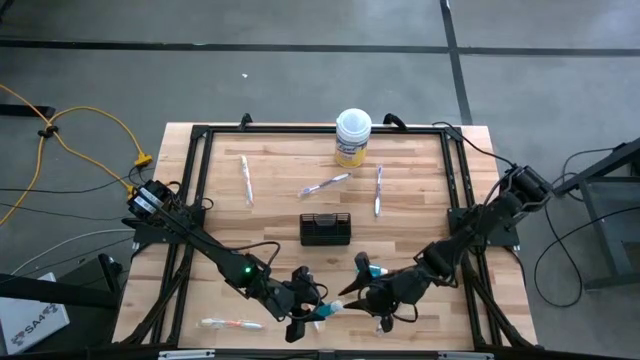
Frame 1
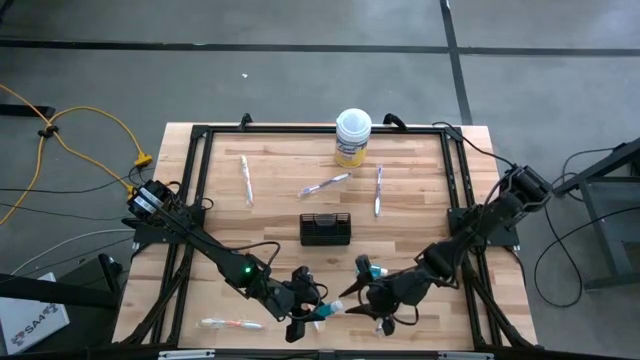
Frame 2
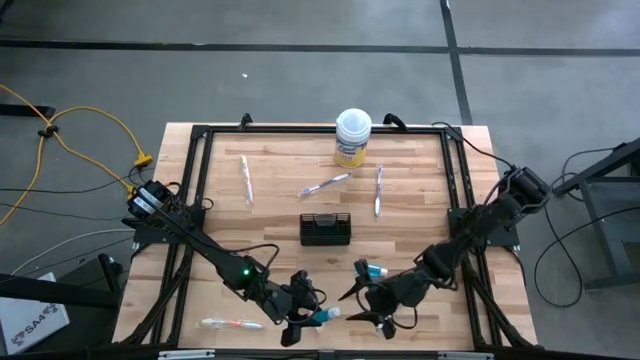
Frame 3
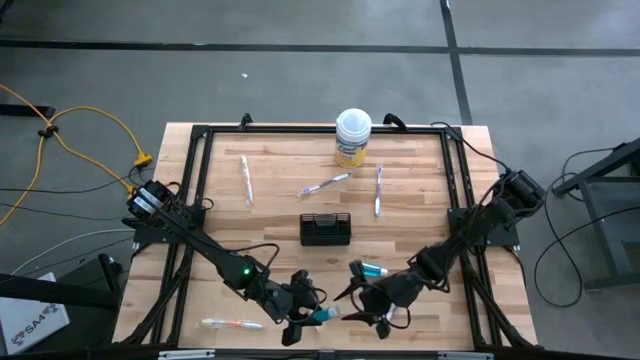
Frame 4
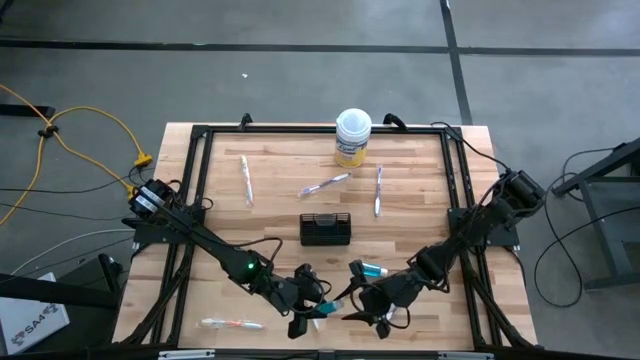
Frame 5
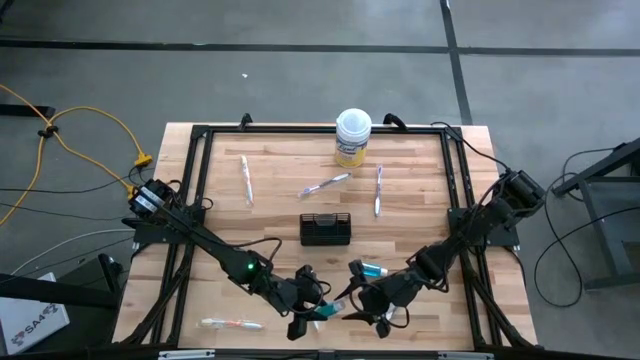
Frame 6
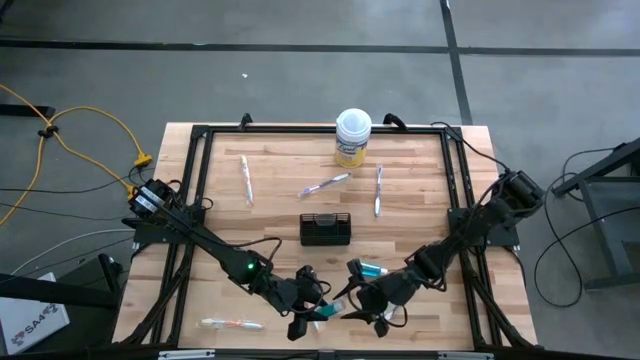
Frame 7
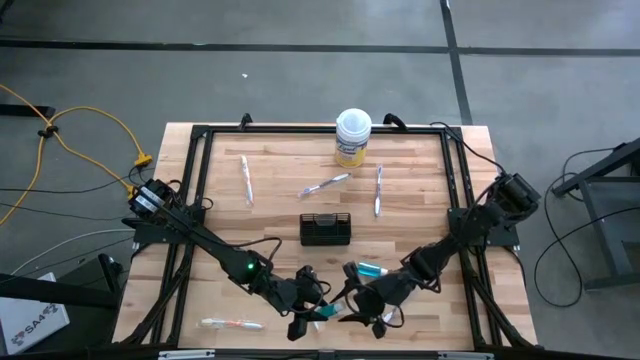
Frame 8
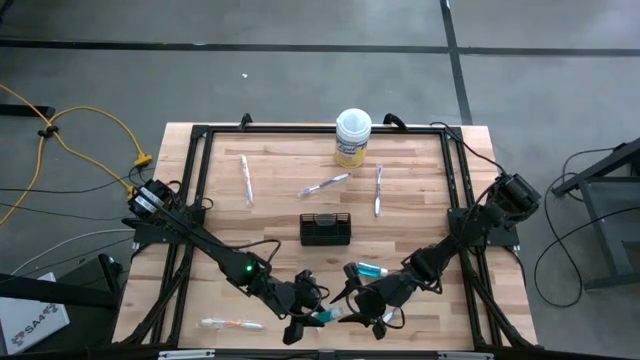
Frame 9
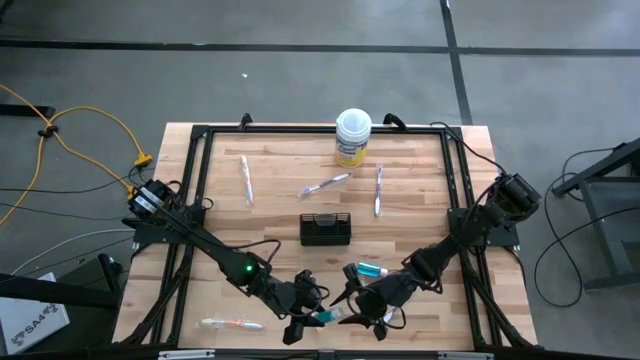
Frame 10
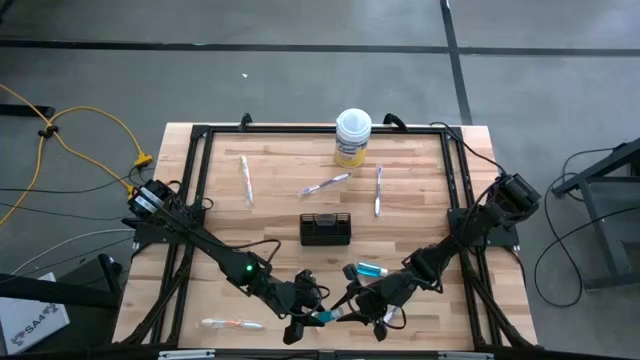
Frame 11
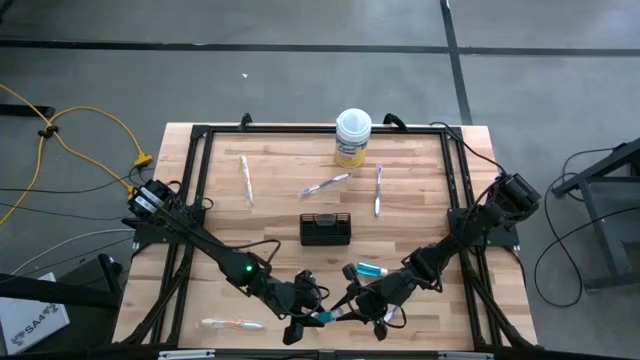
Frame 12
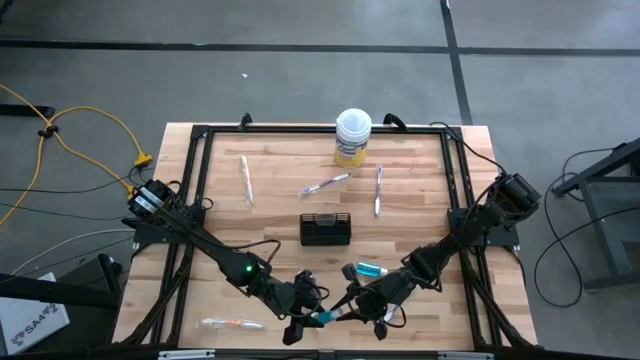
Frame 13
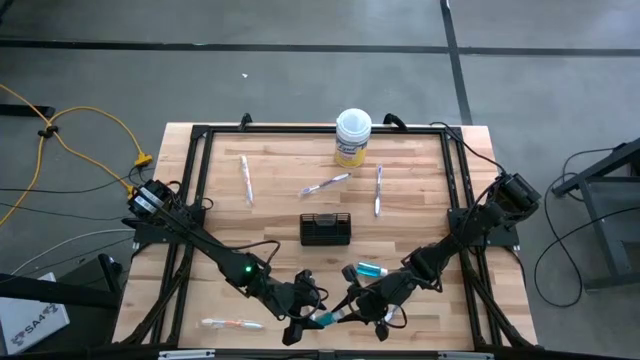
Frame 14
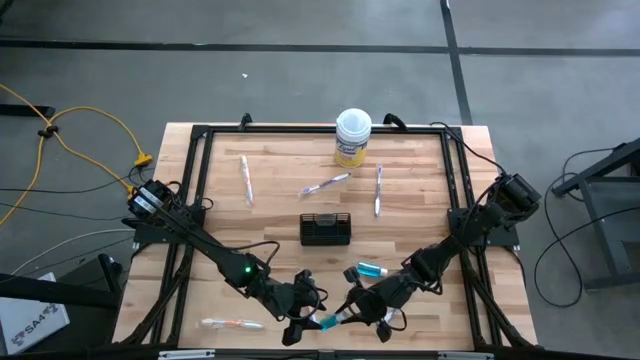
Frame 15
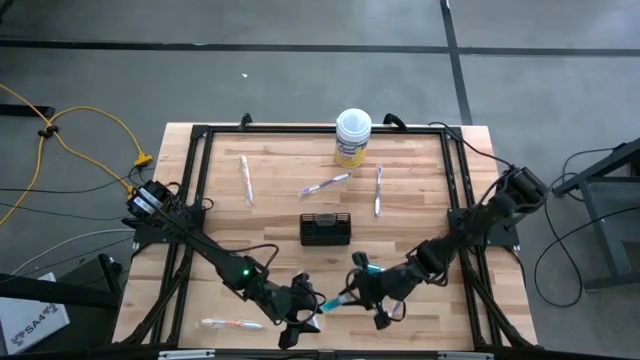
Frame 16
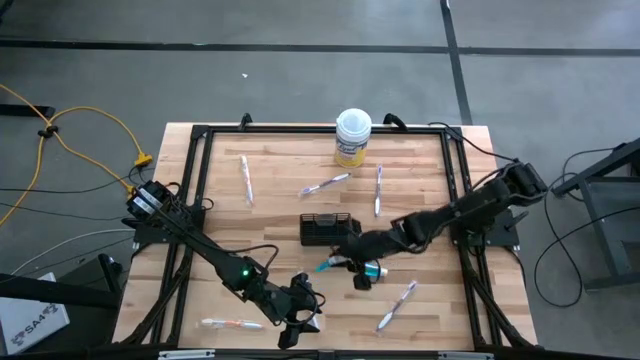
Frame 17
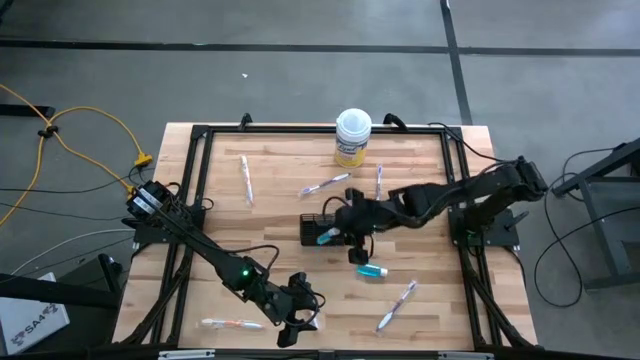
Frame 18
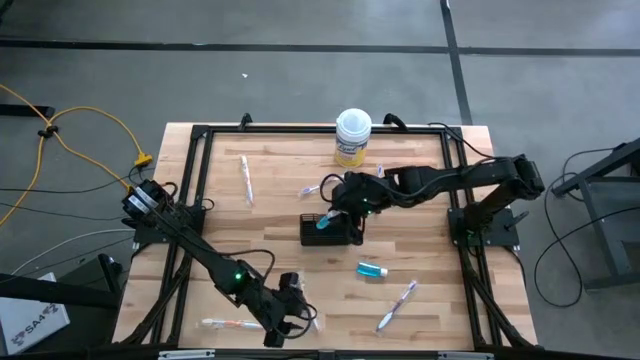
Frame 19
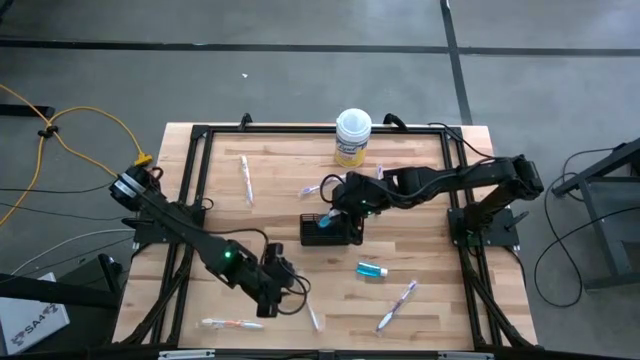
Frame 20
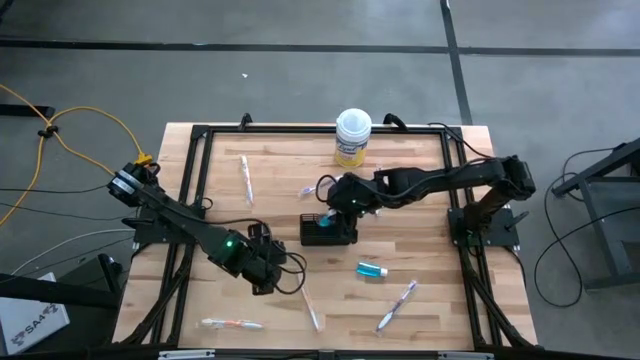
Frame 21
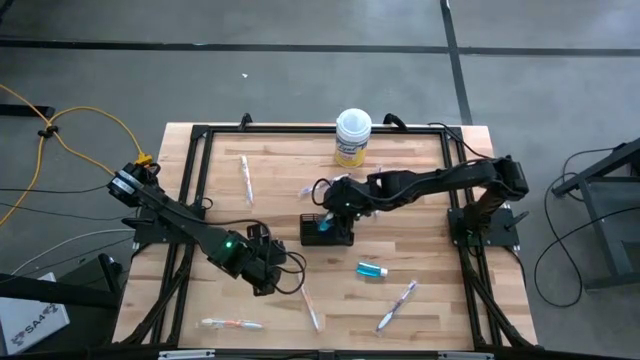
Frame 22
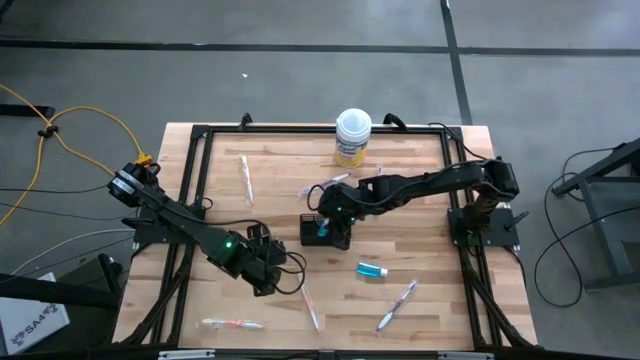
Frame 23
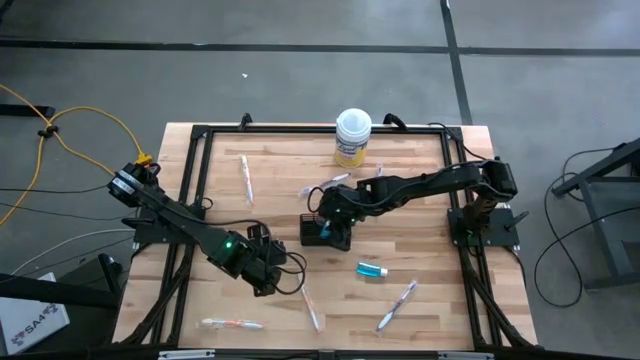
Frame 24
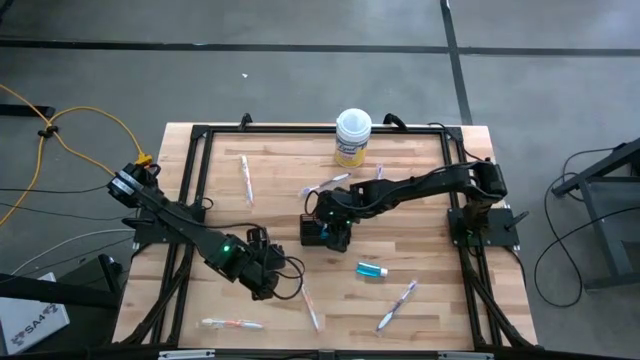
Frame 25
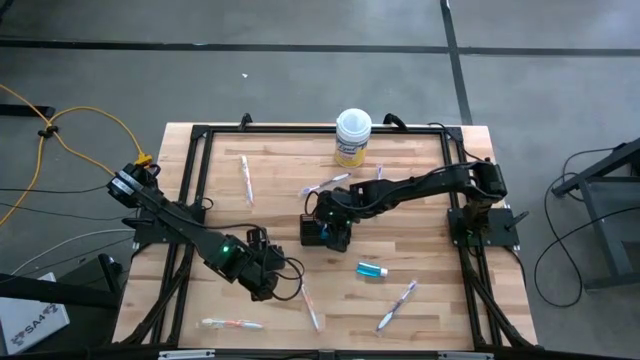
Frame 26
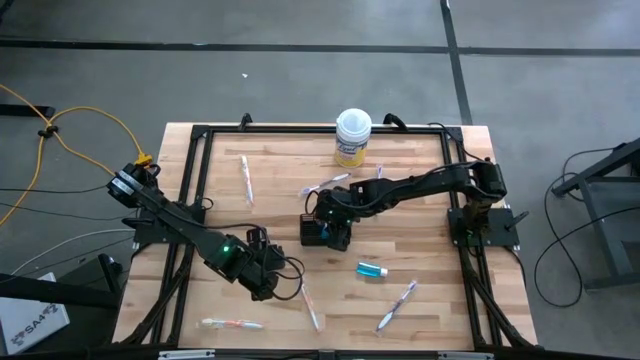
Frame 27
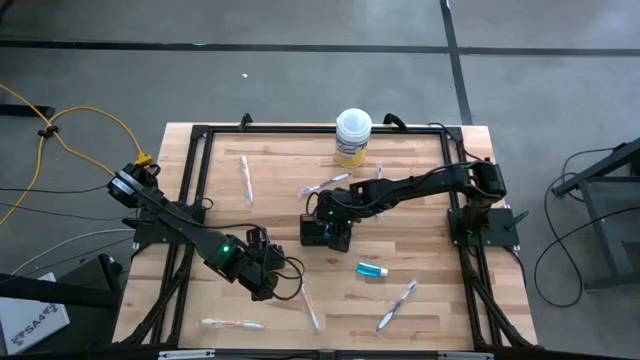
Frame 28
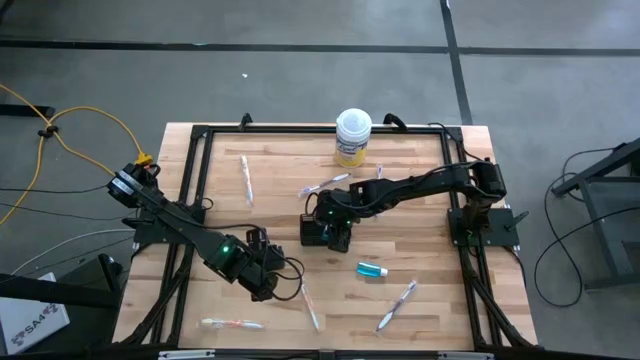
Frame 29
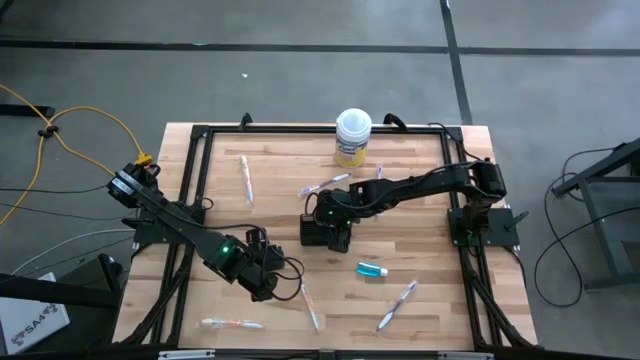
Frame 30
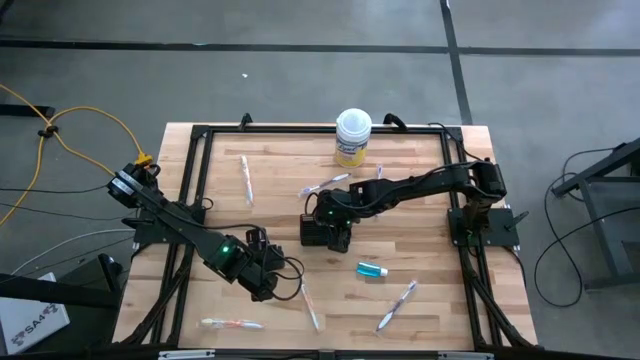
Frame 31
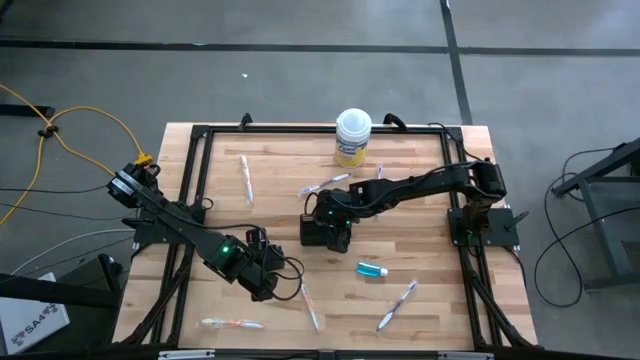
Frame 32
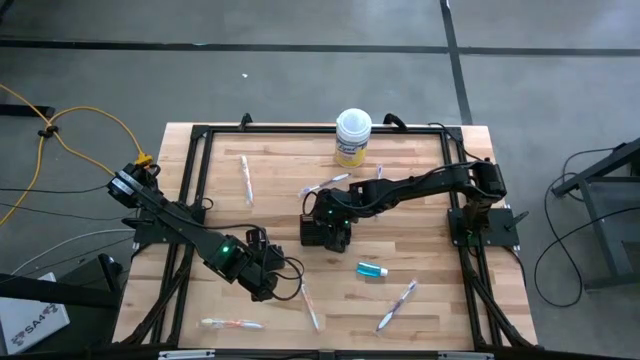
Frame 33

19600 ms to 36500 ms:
Task: Pick & Place toothbrushing station
Put the left blue mouthwash into the wire organizer

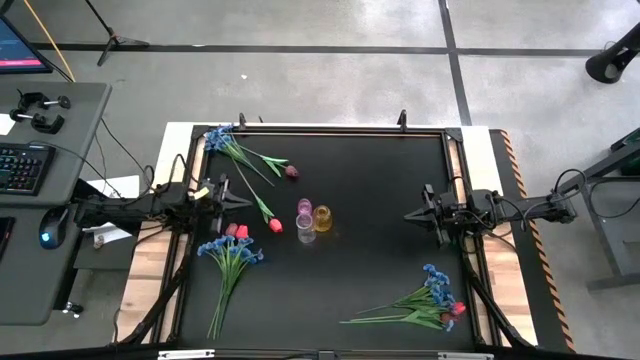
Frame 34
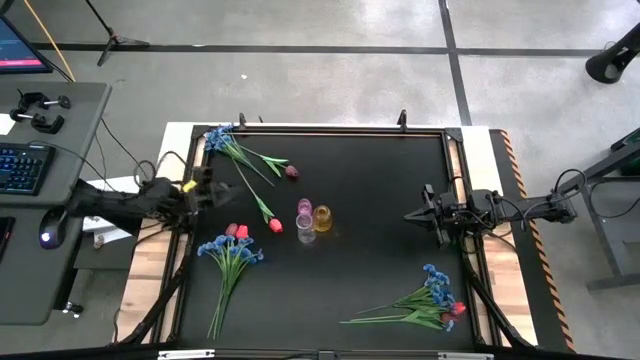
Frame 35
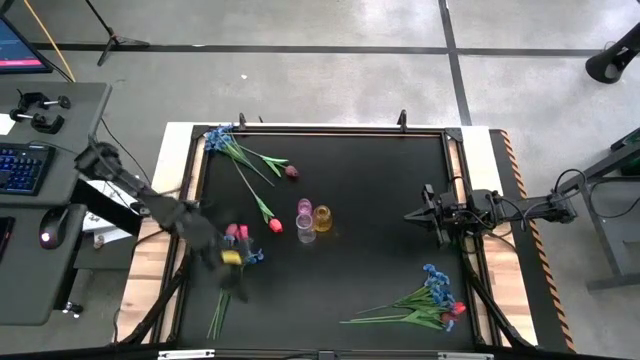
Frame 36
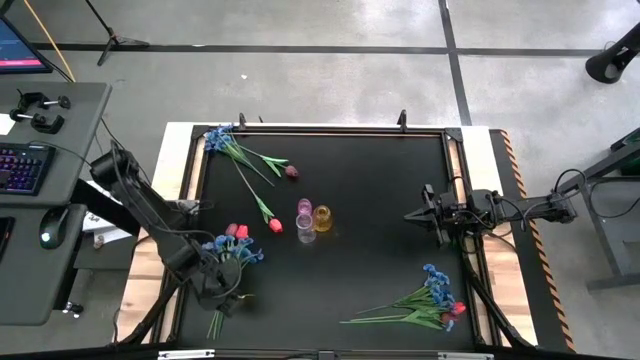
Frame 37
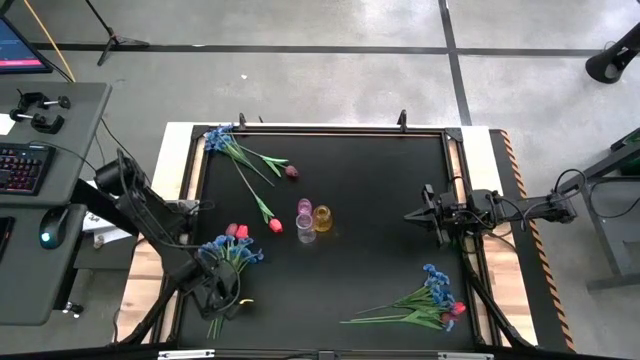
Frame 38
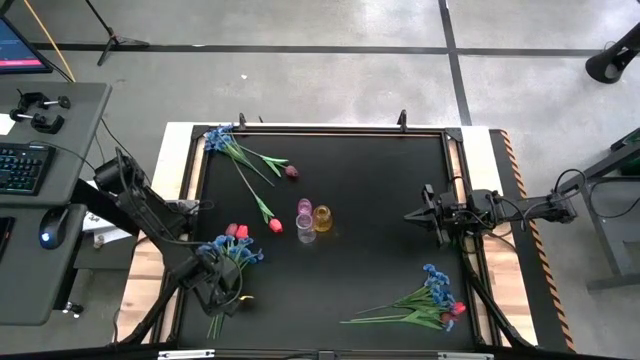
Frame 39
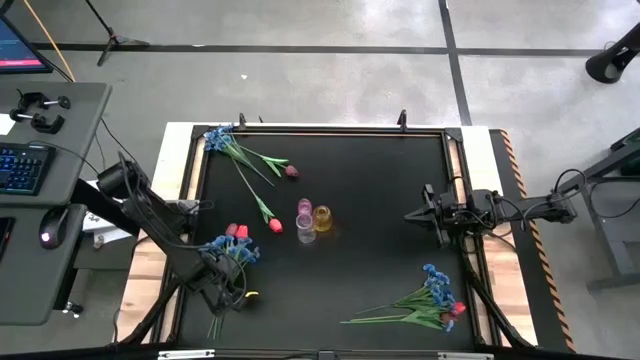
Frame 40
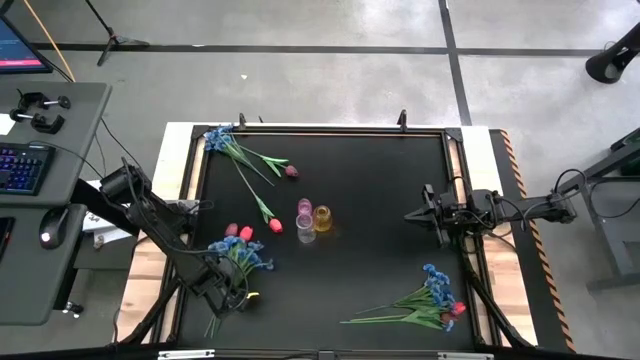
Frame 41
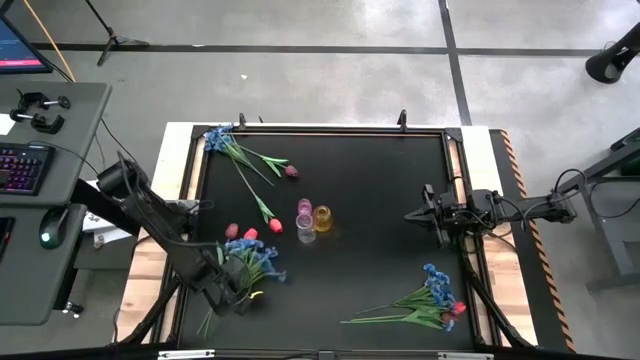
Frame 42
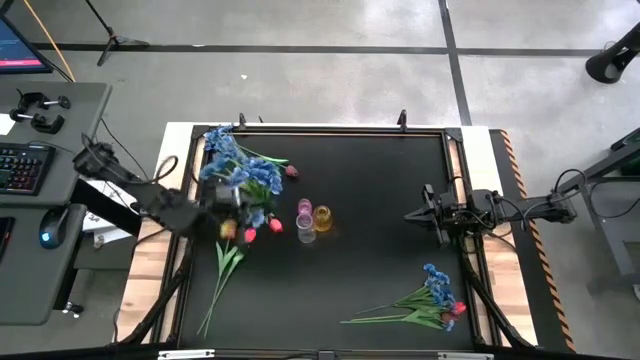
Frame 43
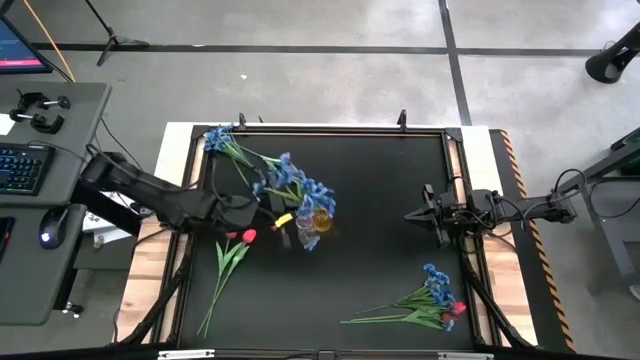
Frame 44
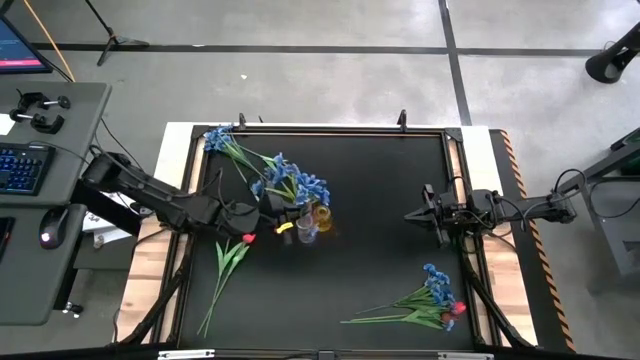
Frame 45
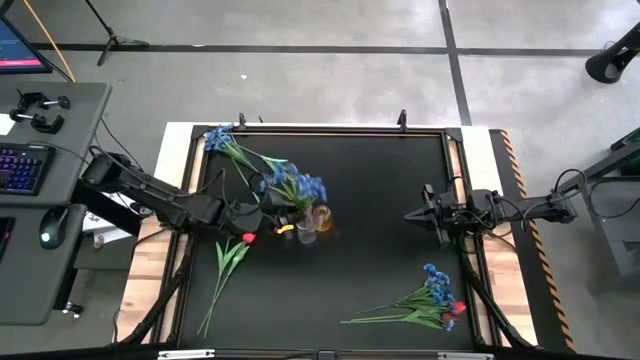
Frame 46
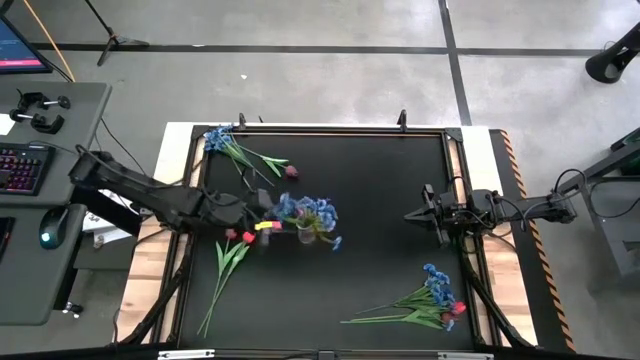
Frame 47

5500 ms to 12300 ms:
Task: Sort flowers into vase by color
Put the bottom left blue flower into the transparent vase
